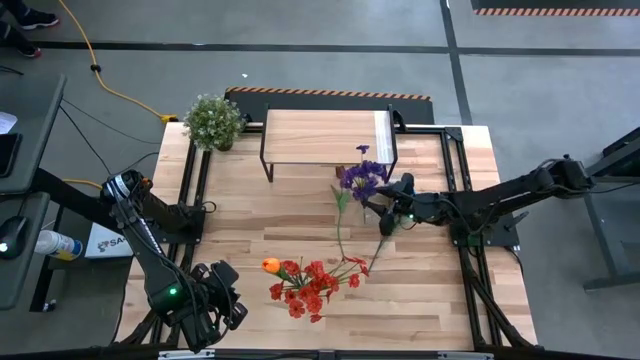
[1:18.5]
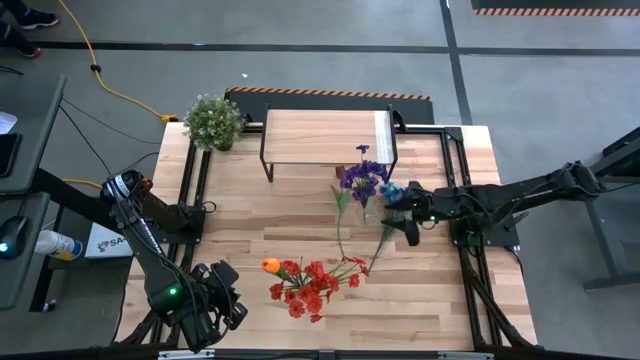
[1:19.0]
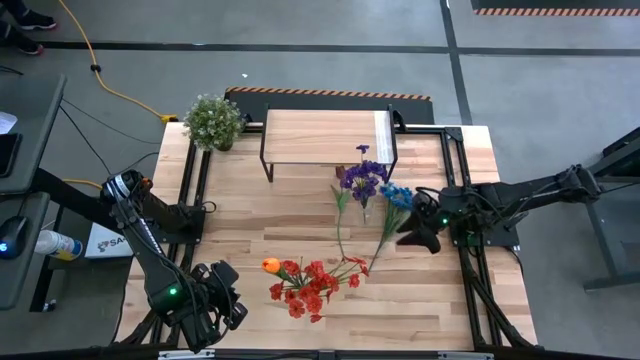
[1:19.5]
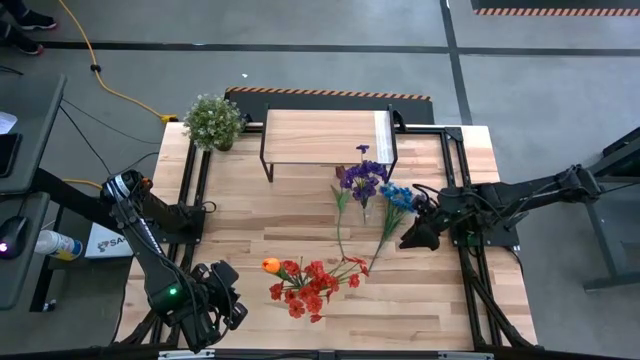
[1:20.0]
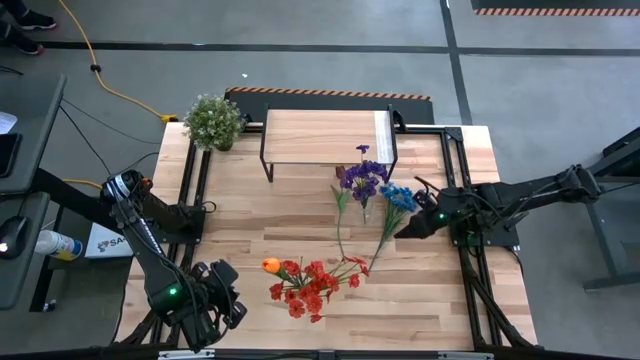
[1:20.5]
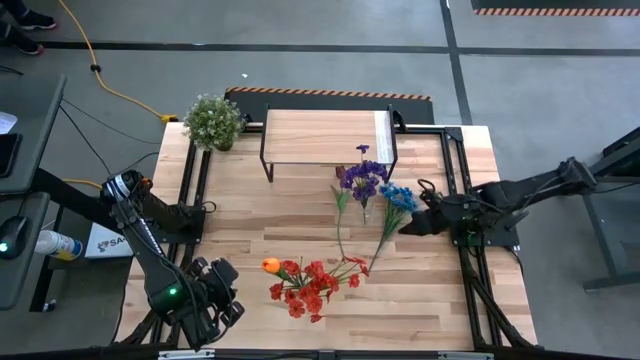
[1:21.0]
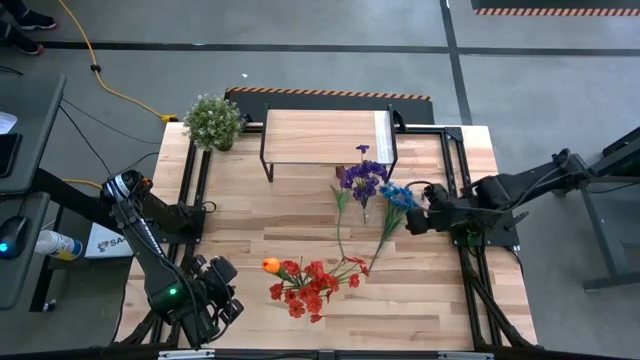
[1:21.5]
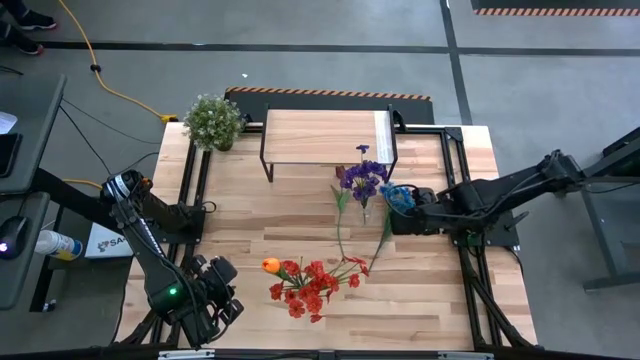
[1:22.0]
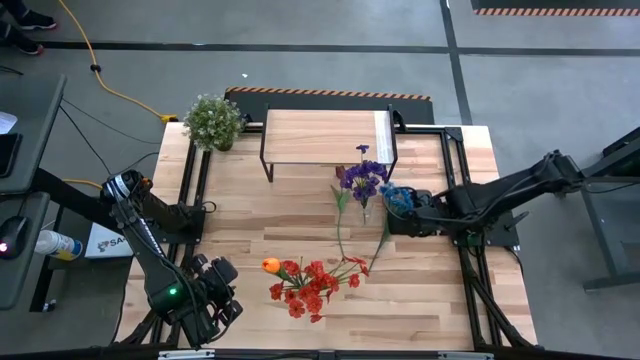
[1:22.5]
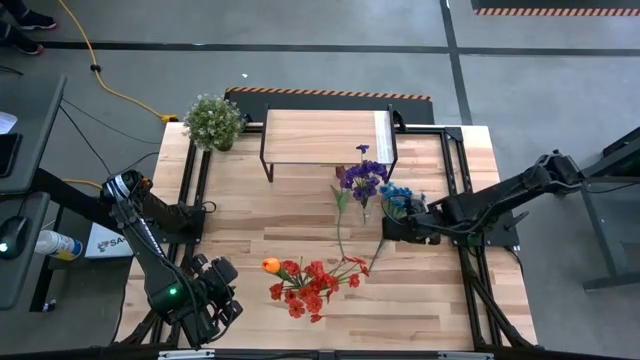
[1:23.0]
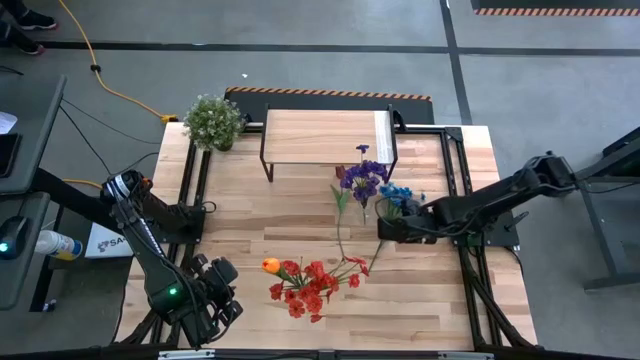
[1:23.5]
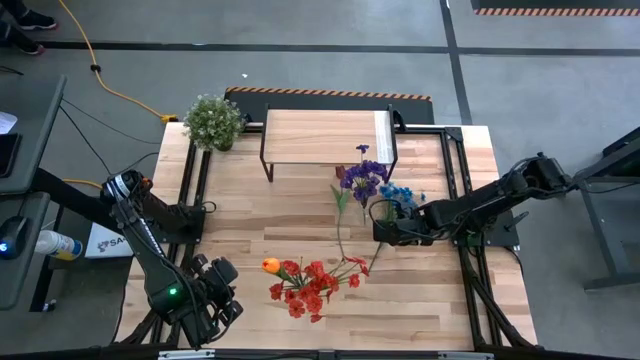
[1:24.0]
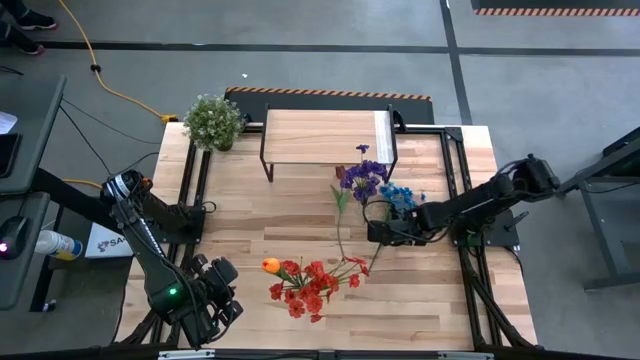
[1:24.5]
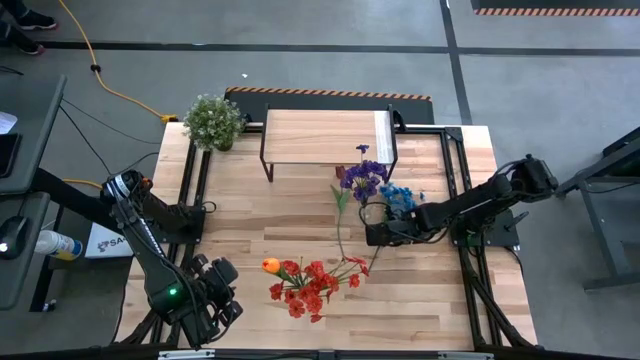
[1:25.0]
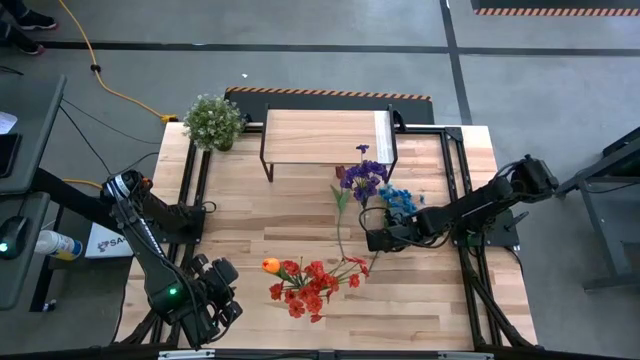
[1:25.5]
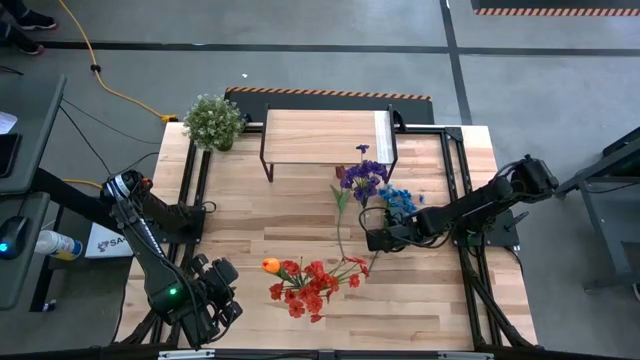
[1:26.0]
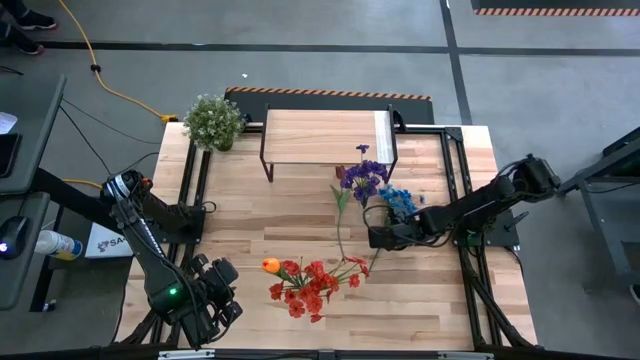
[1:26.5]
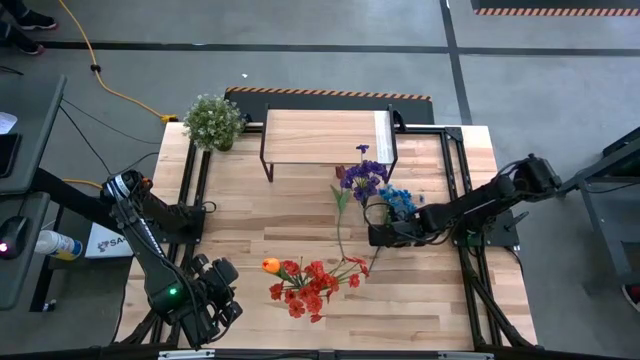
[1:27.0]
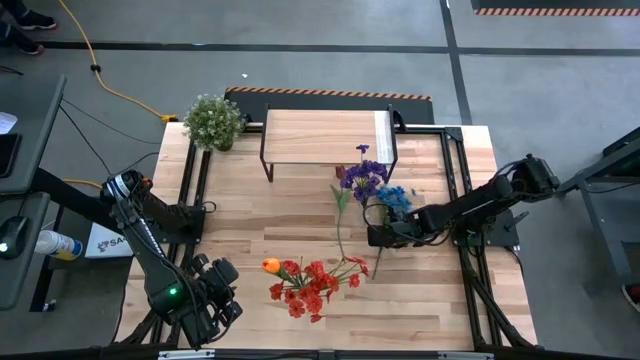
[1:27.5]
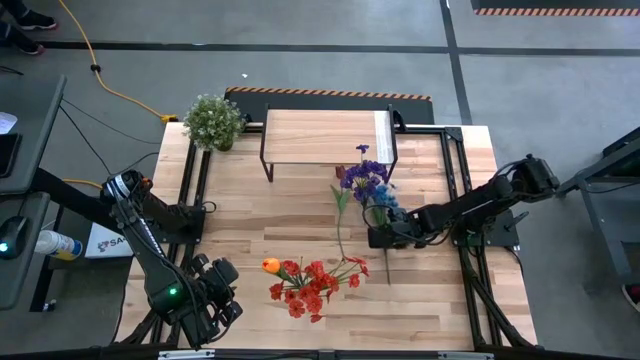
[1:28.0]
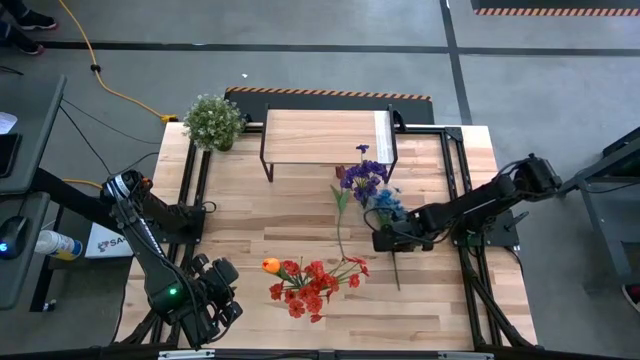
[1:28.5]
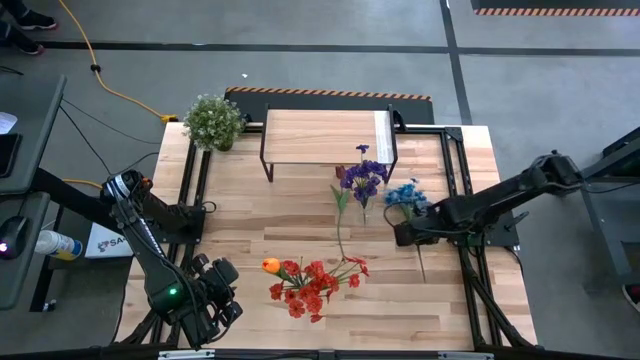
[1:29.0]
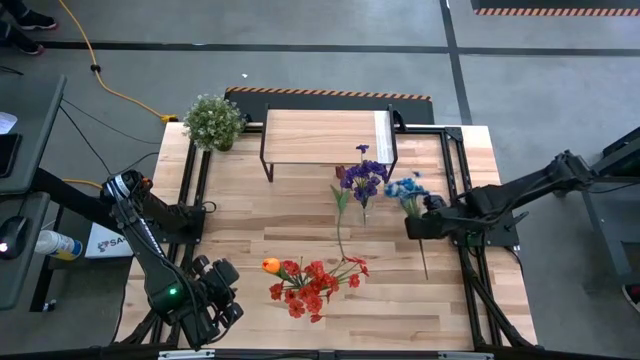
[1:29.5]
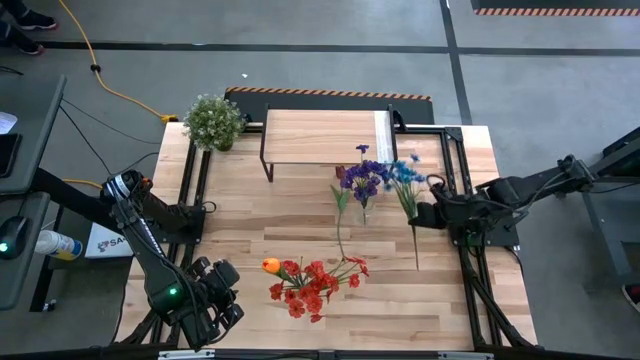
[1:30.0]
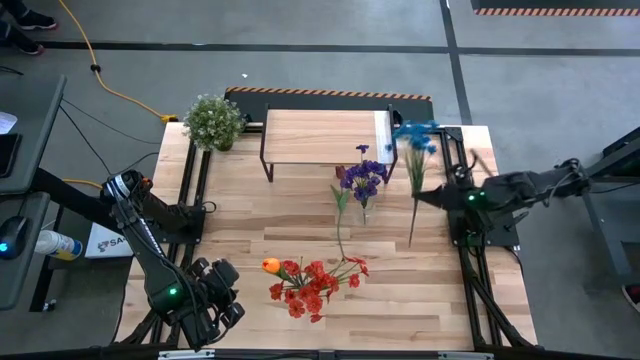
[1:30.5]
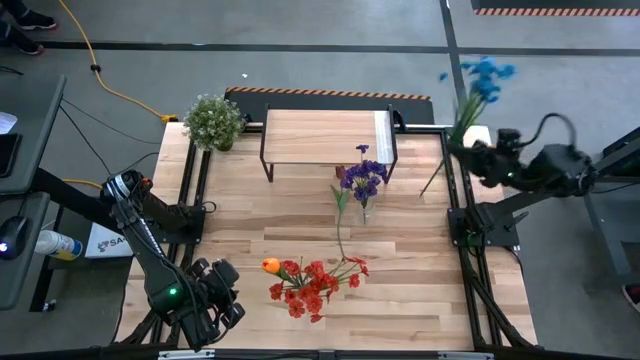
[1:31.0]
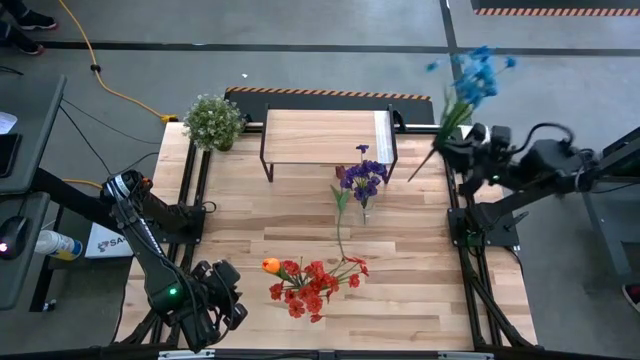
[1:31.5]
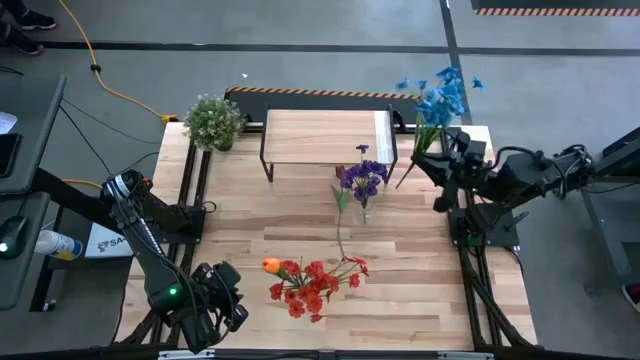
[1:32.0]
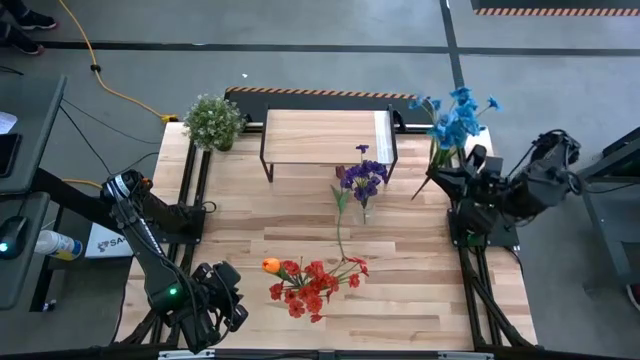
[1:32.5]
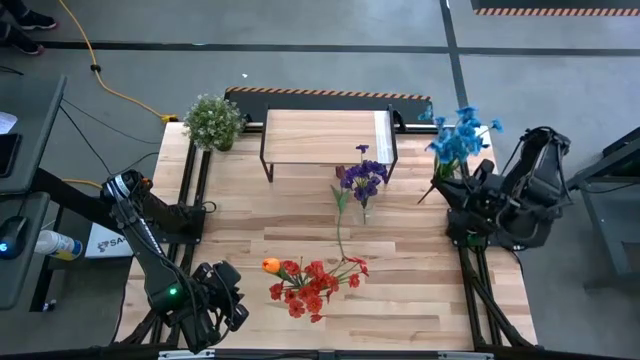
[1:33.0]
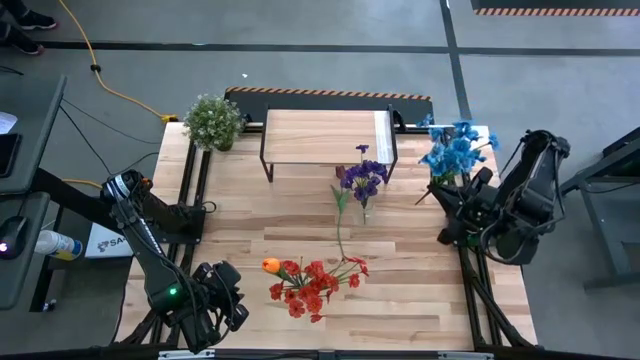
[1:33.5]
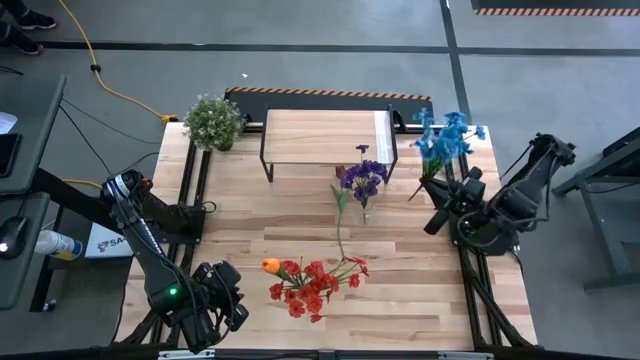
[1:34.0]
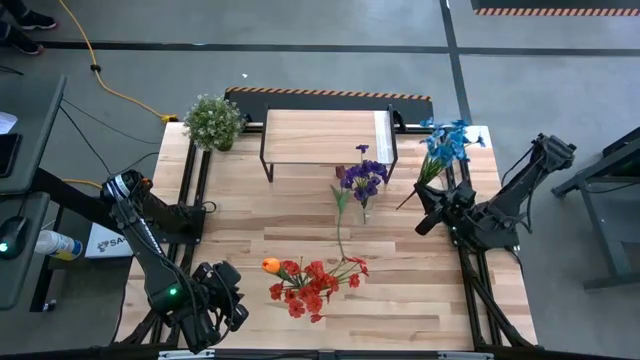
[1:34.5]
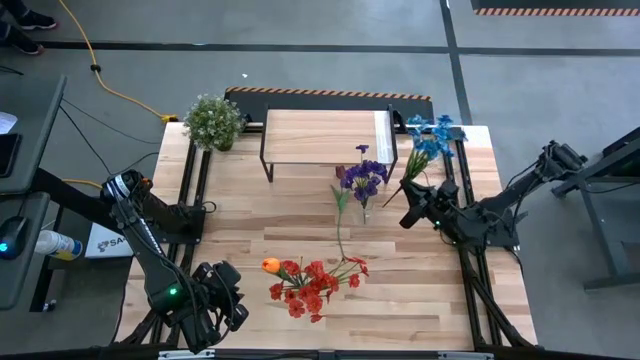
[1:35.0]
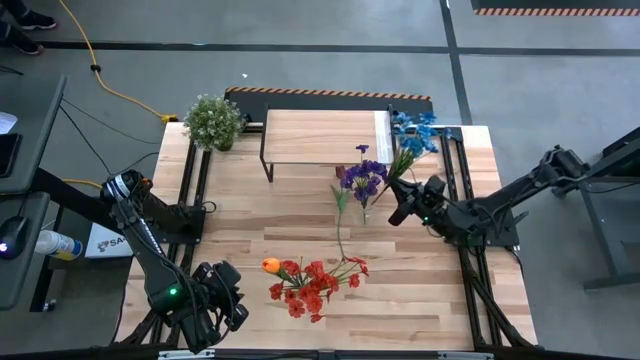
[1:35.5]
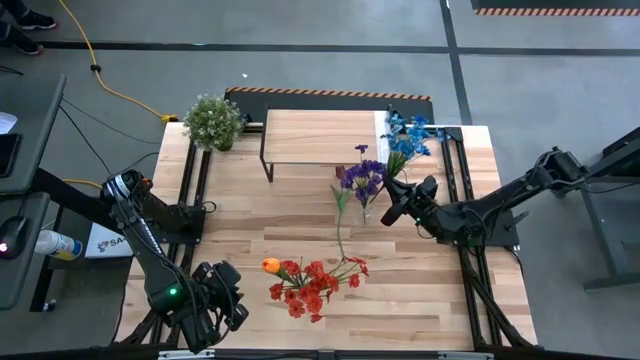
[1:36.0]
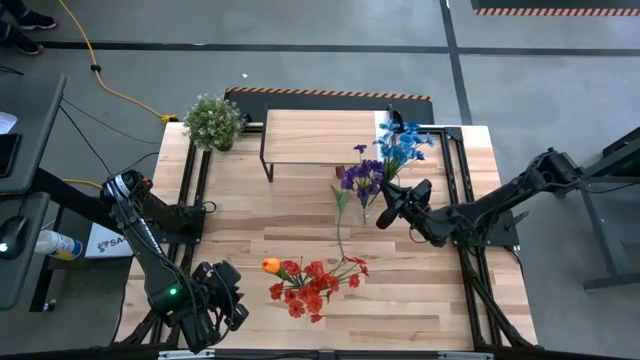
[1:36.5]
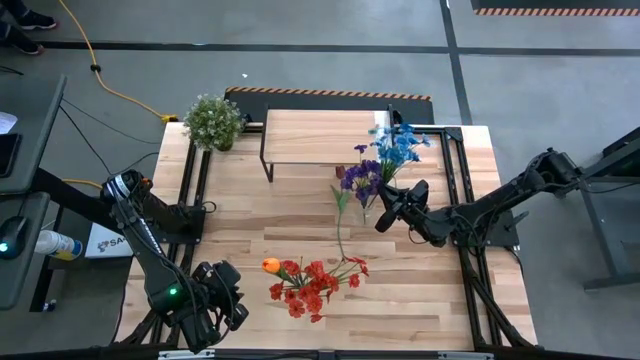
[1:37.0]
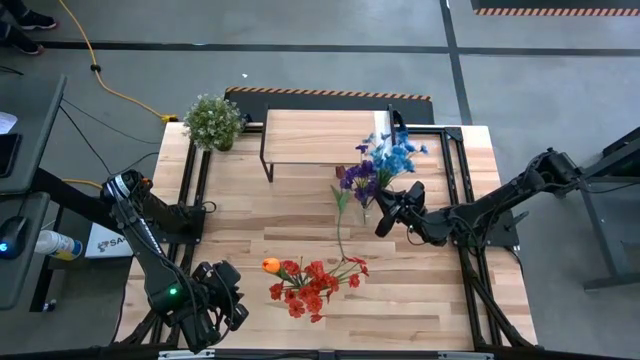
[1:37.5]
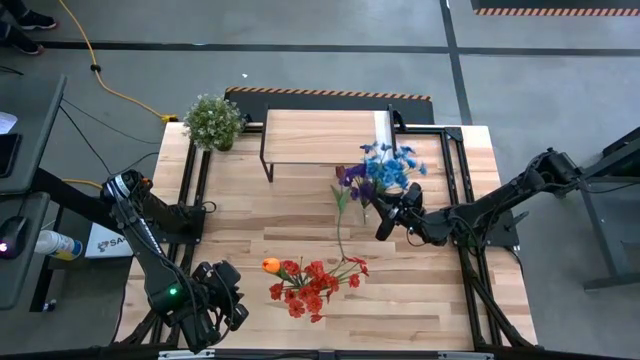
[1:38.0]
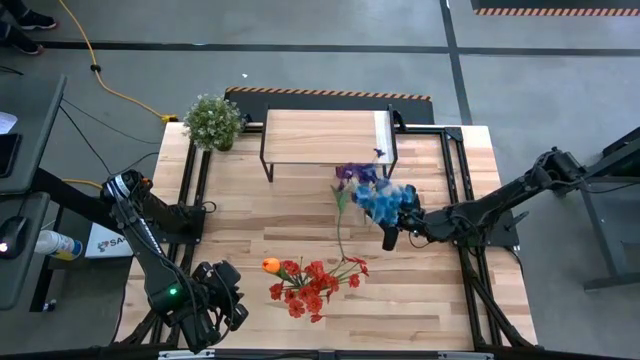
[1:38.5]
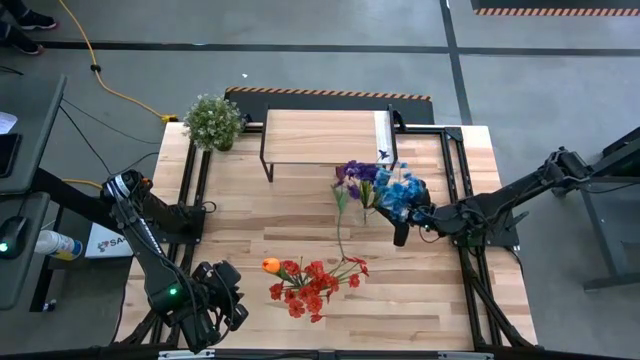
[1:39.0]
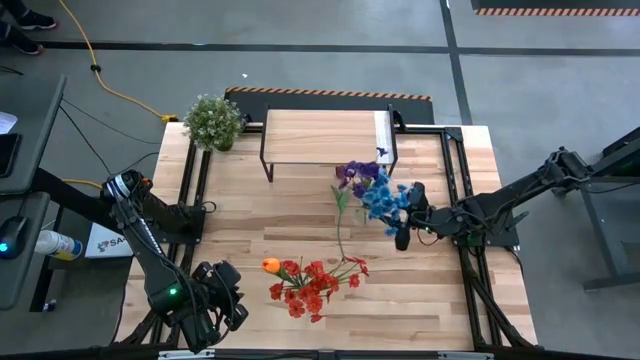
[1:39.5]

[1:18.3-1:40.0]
Task: Pick and place flowers into a vace then onto a shelf
Put the blue flowers into the top transparent vase
